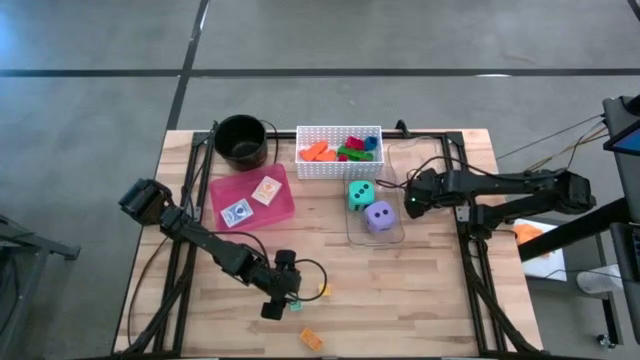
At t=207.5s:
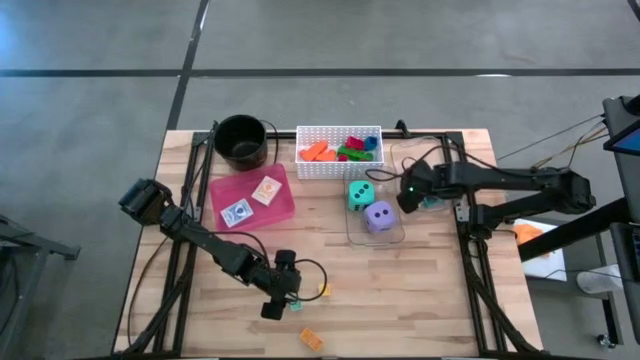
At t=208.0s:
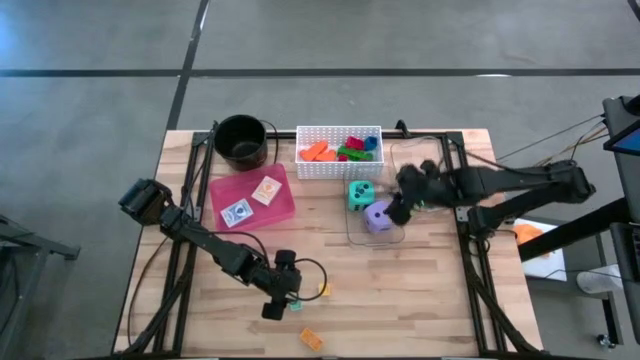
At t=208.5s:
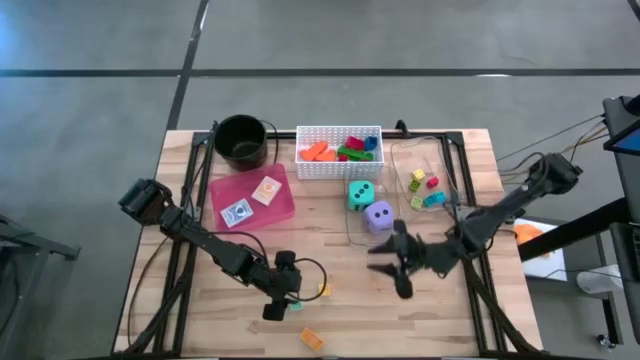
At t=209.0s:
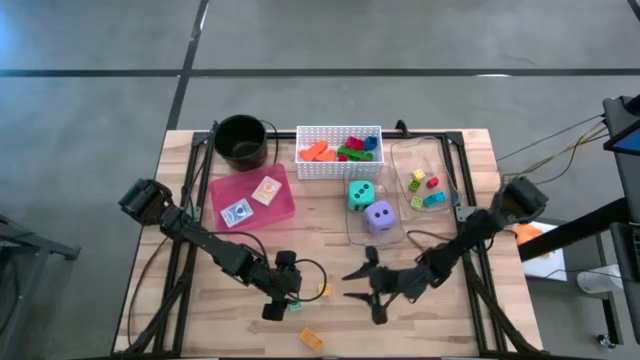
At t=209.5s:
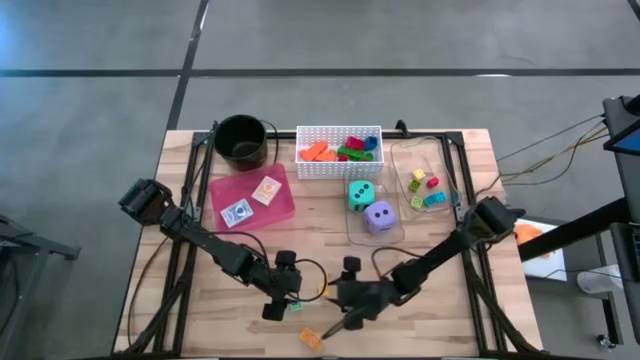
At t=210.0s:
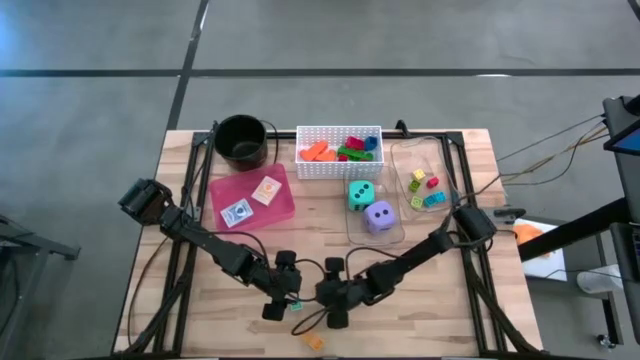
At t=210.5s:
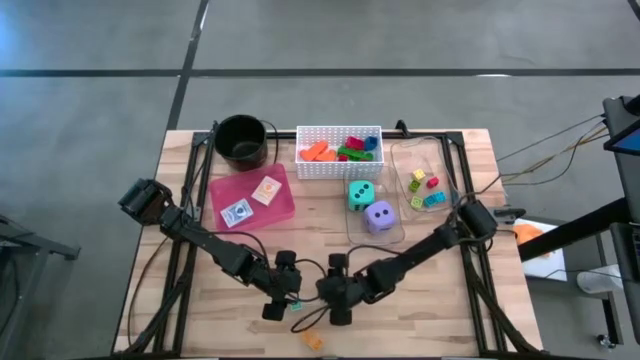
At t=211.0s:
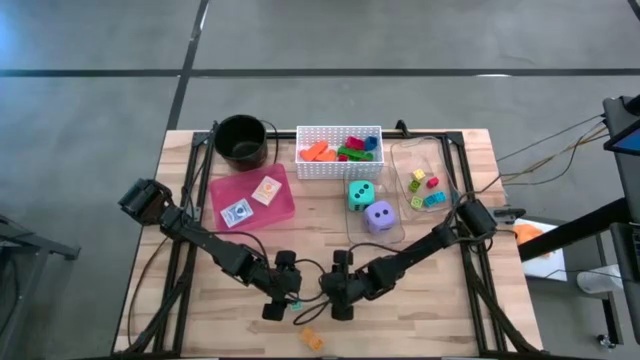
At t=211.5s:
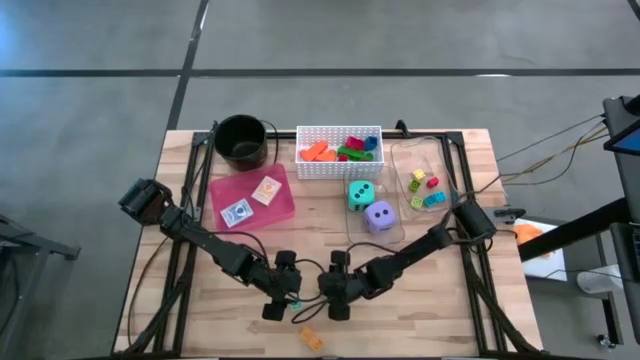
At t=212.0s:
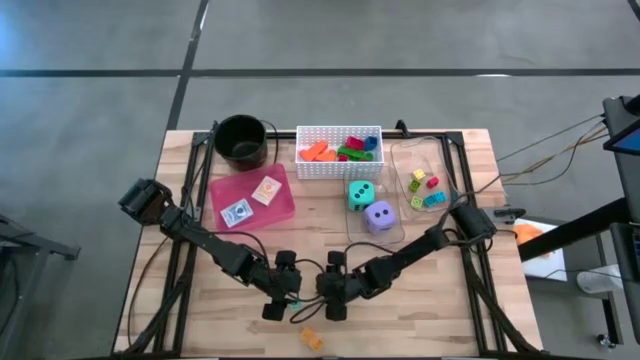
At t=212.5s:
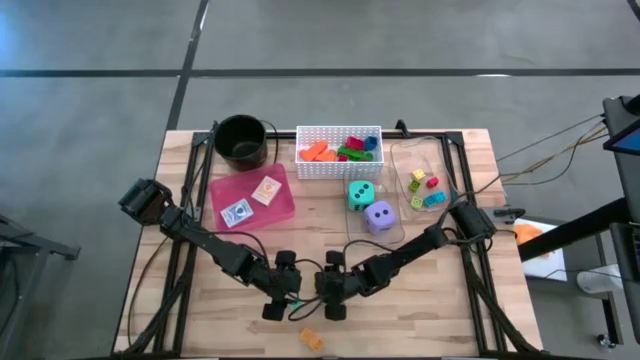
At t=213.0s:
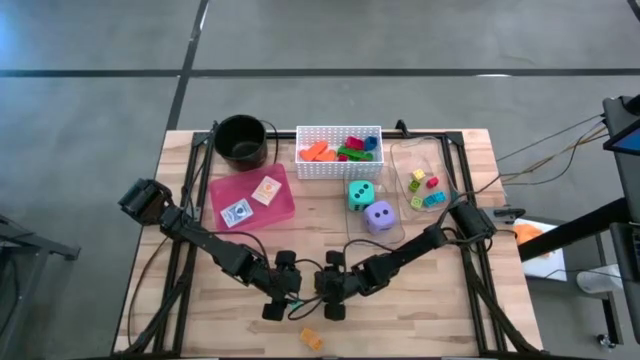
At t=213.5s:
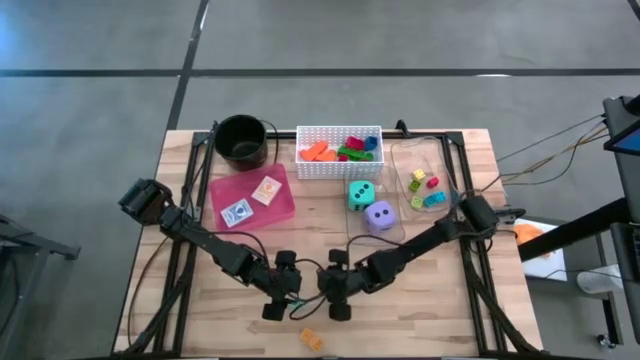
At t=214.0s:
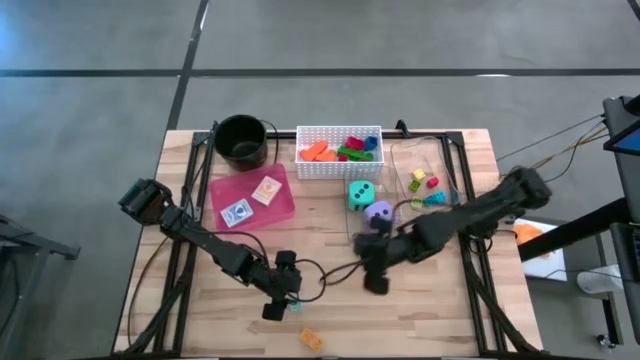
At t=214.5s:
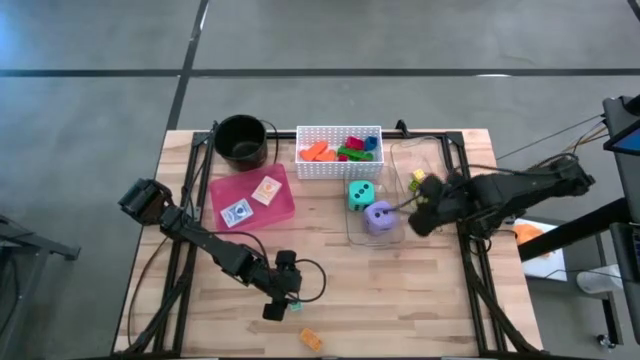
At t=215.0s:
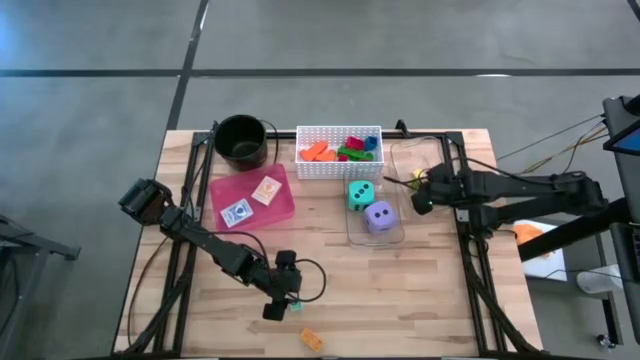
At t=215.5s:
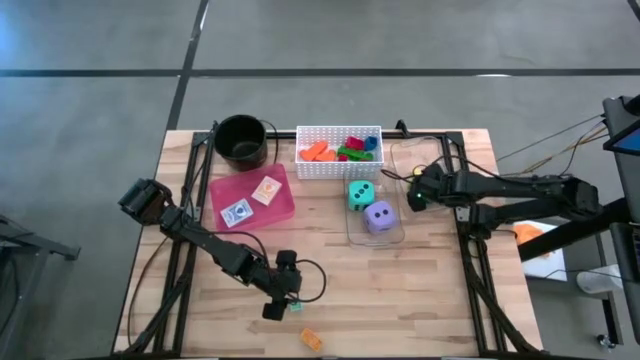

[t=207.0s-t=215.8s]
Task: Pick & Place Toys
Put the small light yellow game piece into the right transparent bin

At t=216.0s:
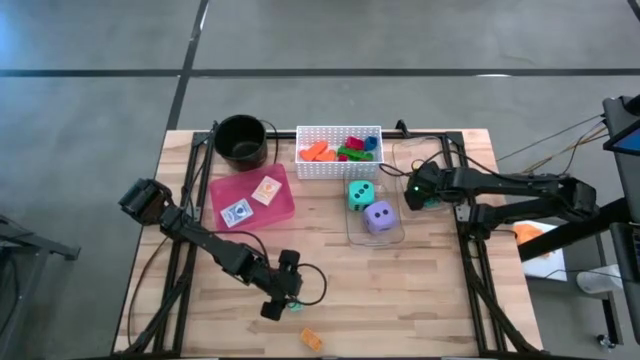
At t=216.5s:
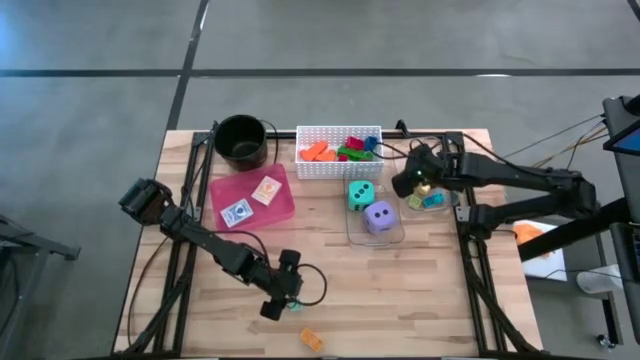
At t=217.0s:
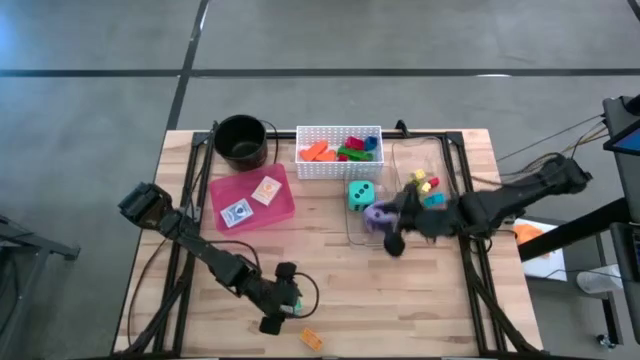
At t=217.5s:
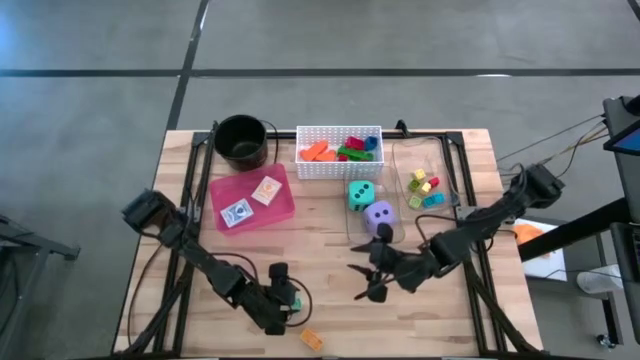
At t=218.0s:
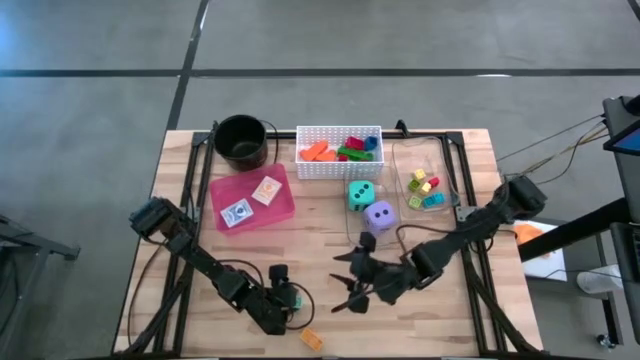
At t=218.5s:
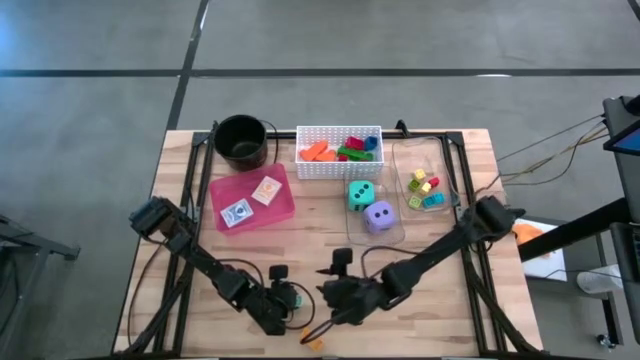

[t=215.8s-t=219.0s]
Put the small light blue game piece into the right transparent bin

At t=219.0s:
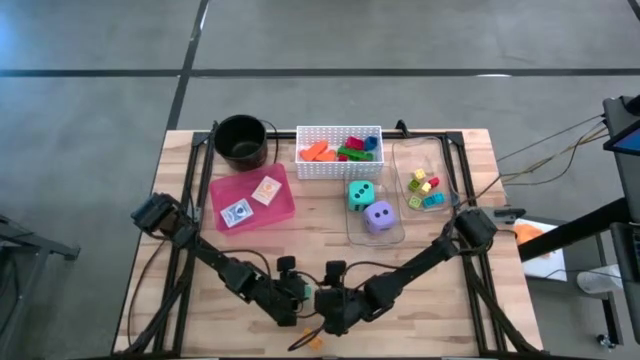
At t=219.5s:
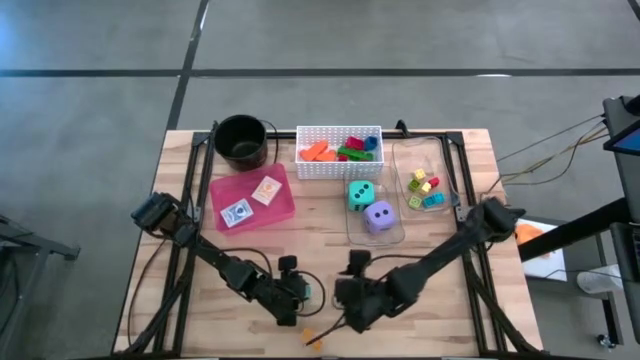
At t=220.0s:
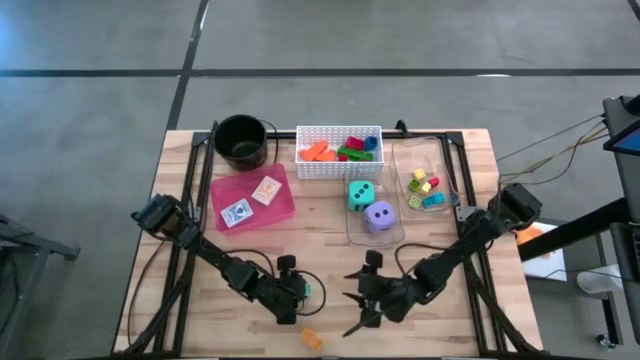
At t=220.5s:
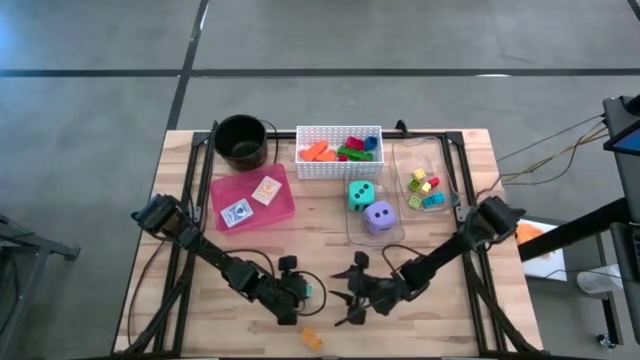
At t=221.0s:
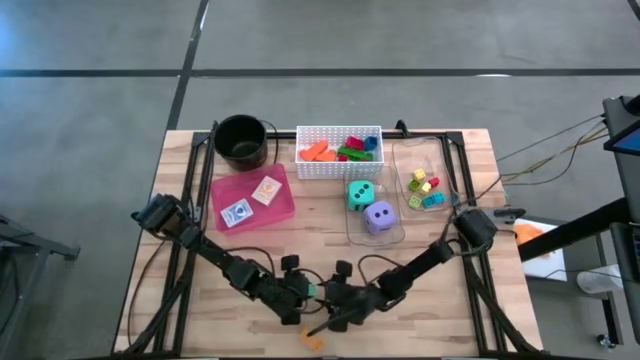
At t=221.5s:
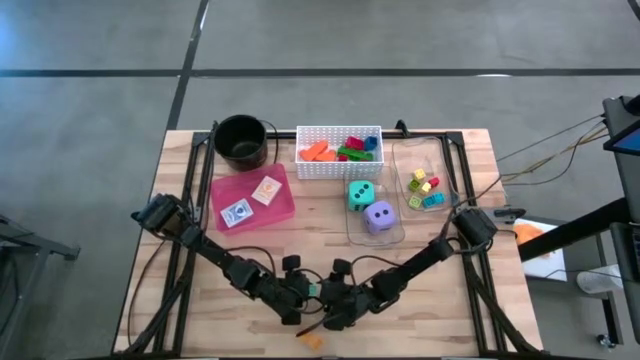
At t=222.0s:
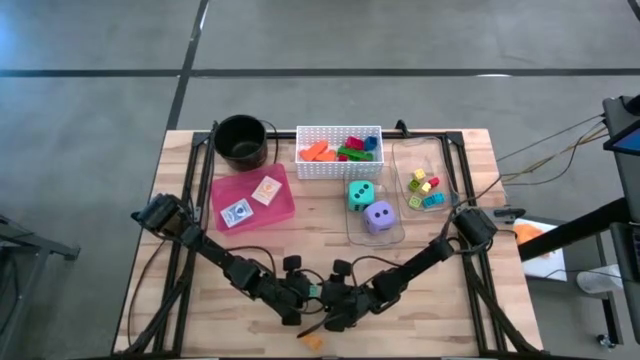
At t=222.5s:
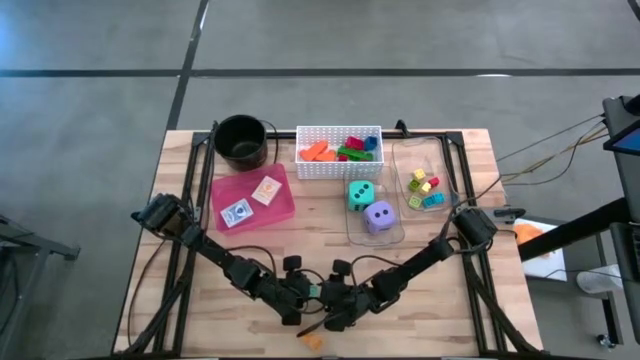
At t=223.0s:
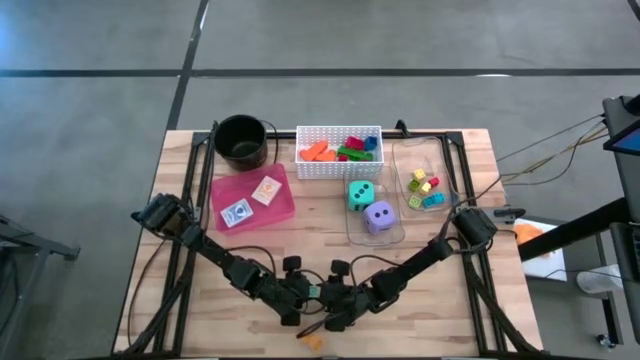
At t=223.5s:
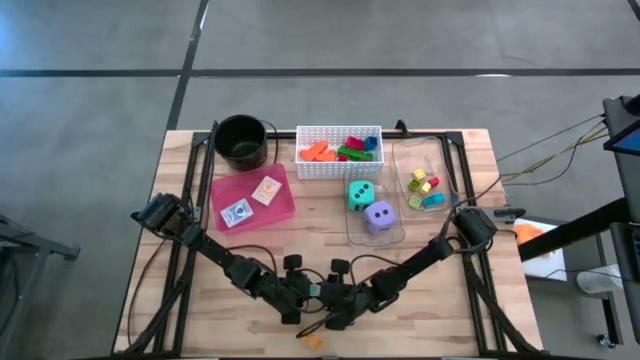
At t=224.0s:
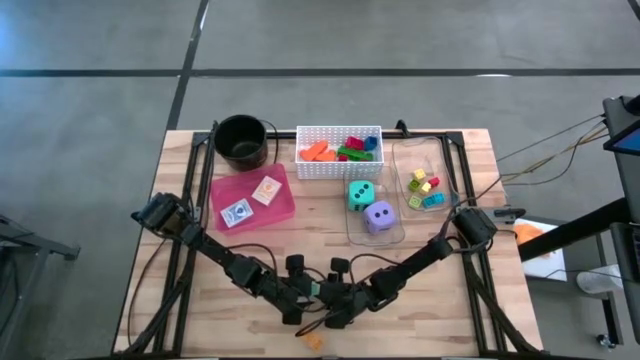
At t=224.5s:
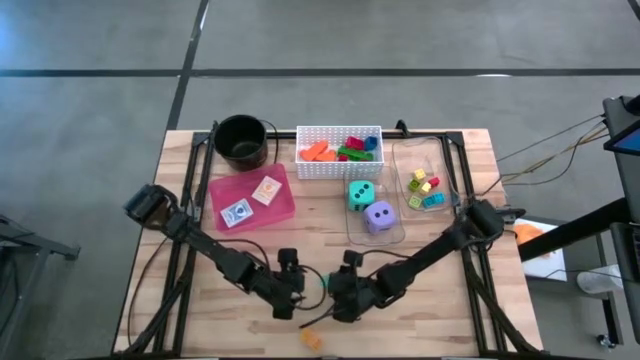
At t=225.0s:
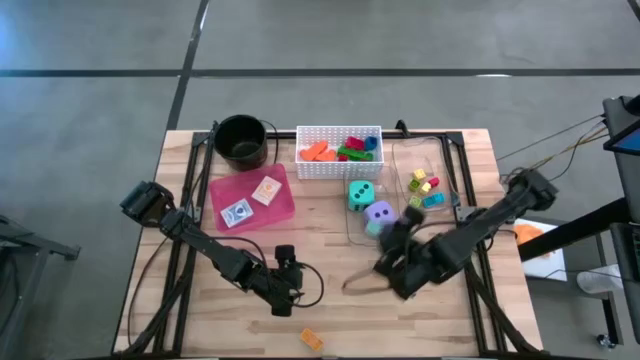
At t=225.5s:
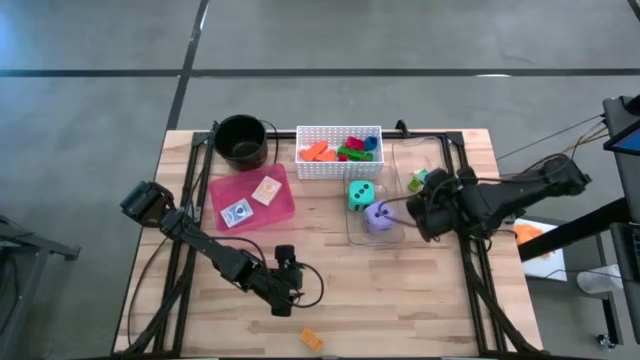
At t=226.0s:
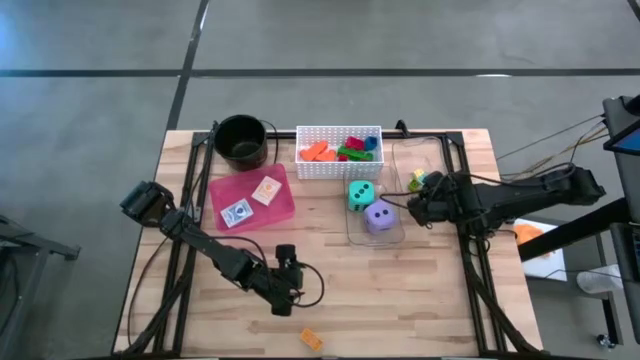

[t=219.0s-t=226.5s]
Put the small light blue game piece into the right transparent bin
